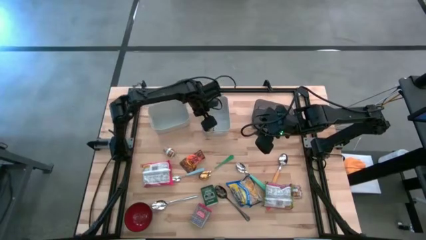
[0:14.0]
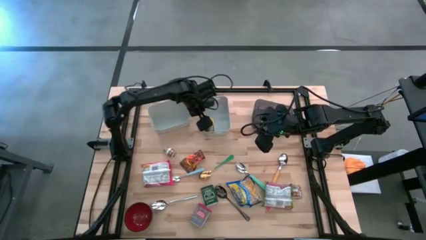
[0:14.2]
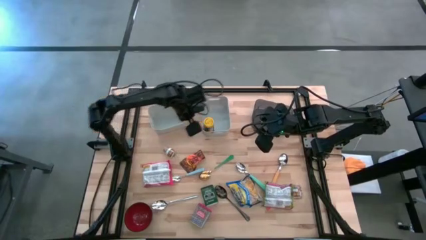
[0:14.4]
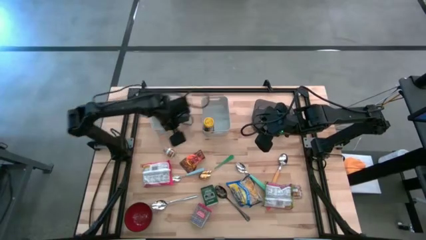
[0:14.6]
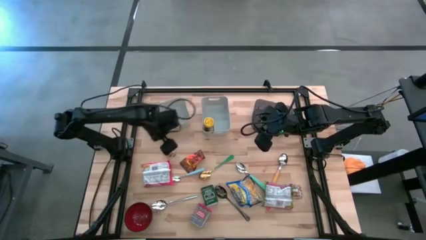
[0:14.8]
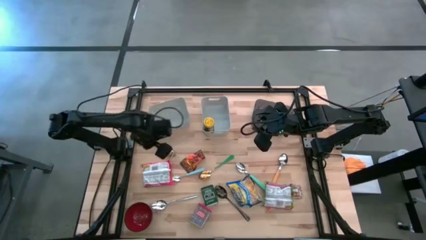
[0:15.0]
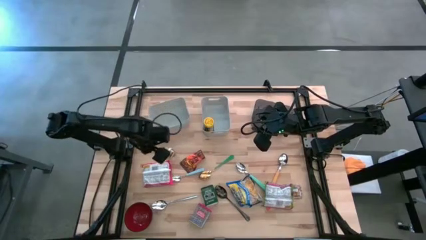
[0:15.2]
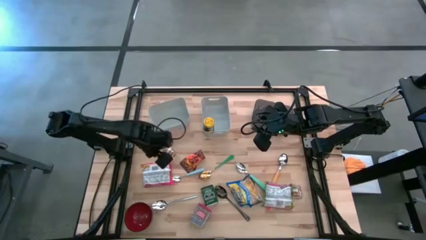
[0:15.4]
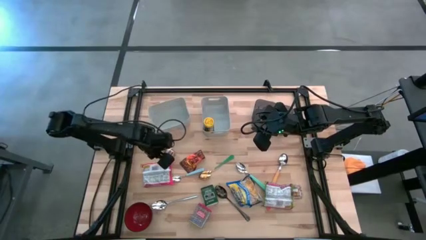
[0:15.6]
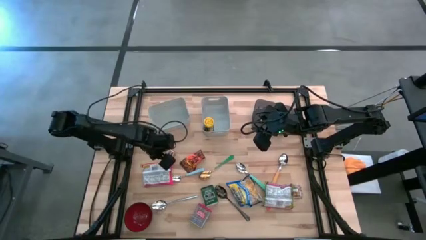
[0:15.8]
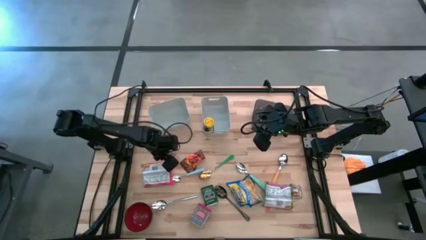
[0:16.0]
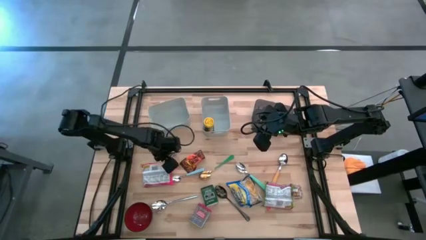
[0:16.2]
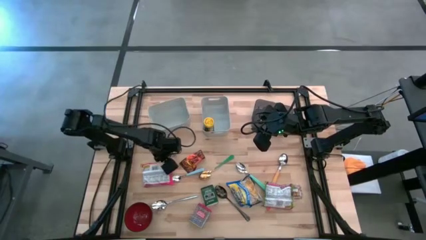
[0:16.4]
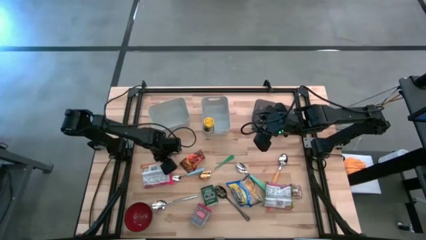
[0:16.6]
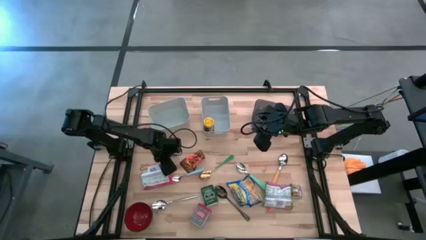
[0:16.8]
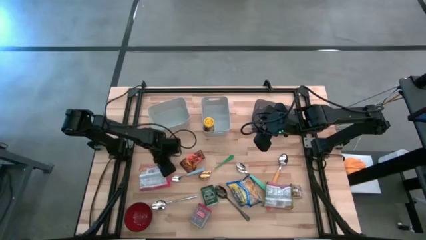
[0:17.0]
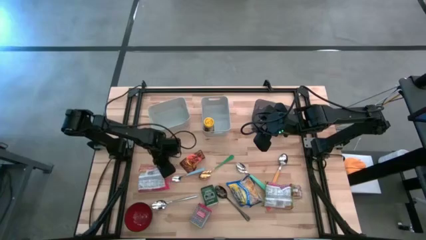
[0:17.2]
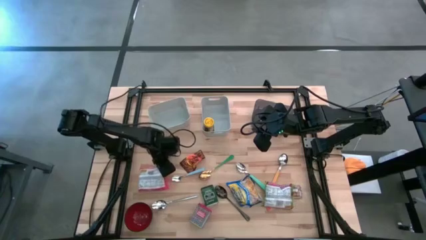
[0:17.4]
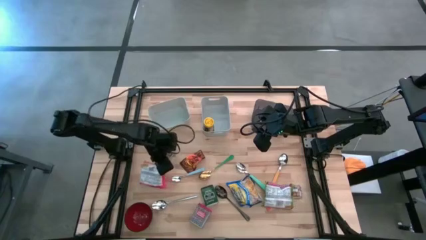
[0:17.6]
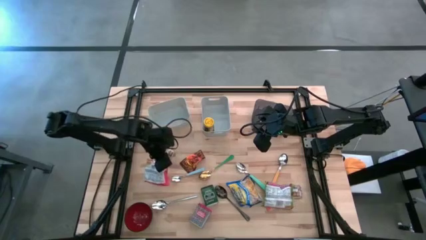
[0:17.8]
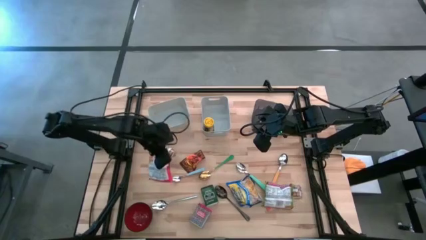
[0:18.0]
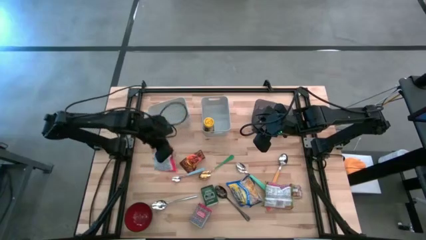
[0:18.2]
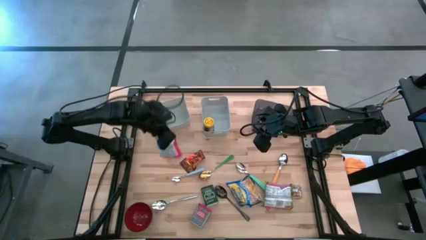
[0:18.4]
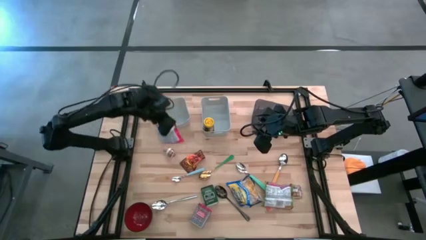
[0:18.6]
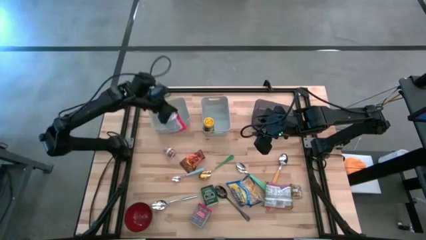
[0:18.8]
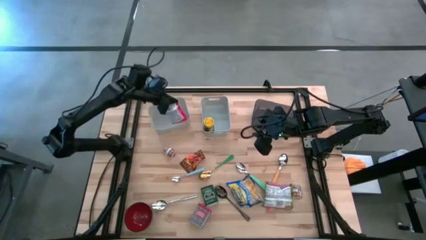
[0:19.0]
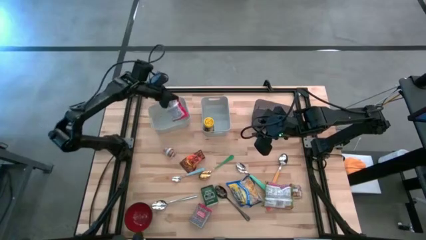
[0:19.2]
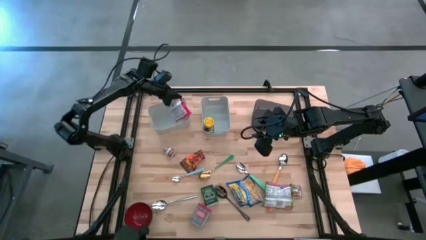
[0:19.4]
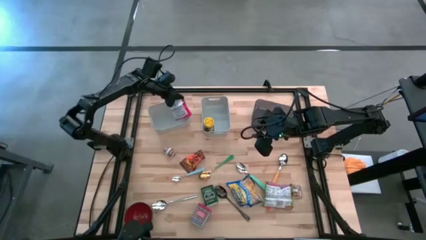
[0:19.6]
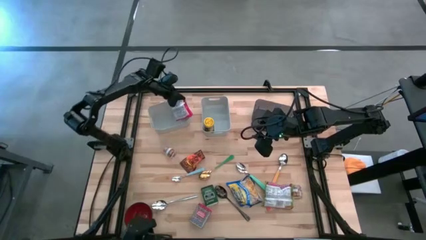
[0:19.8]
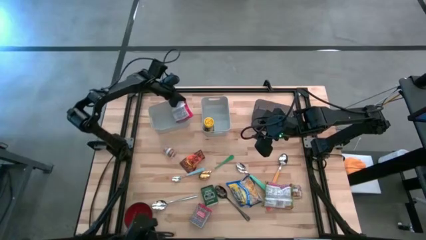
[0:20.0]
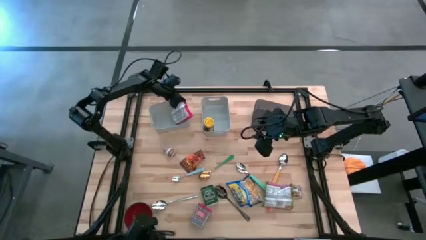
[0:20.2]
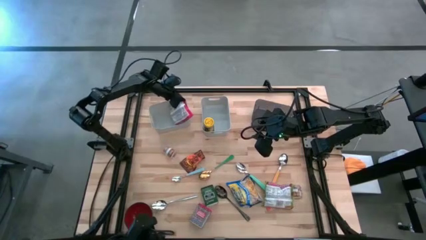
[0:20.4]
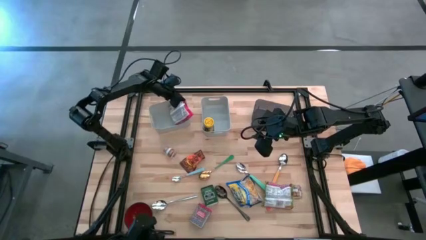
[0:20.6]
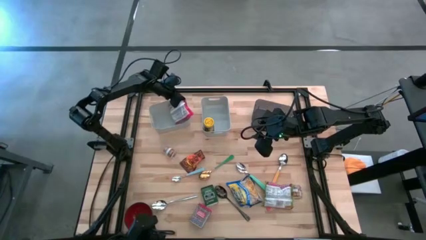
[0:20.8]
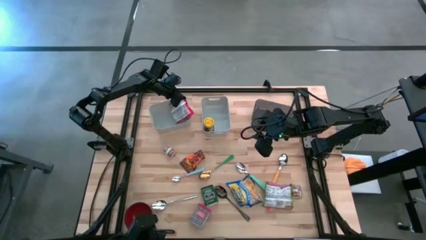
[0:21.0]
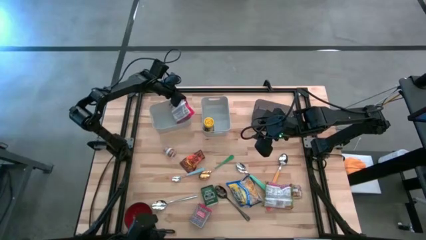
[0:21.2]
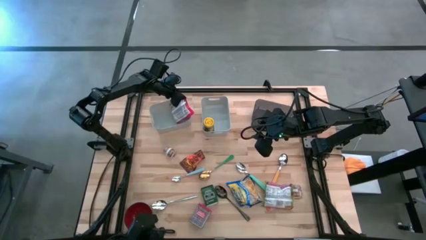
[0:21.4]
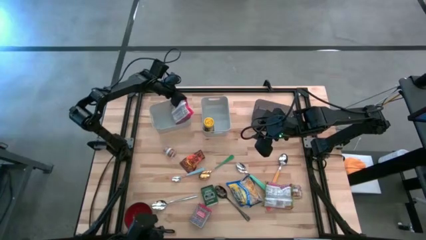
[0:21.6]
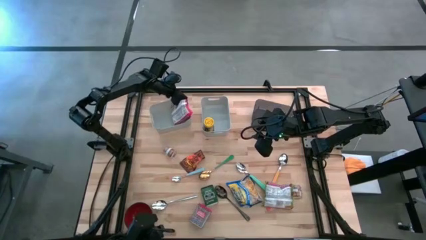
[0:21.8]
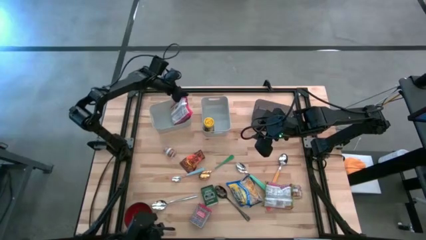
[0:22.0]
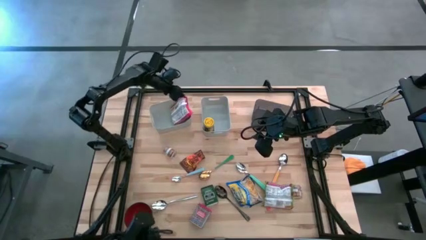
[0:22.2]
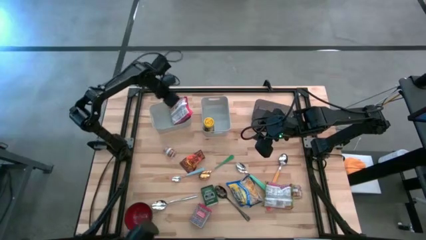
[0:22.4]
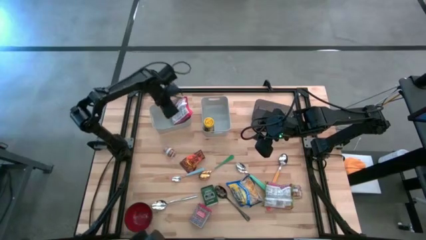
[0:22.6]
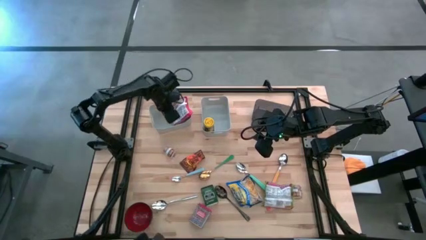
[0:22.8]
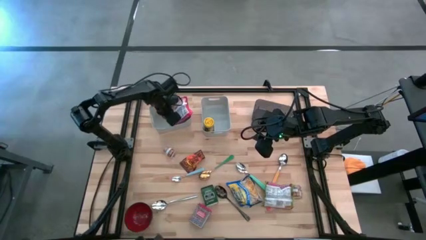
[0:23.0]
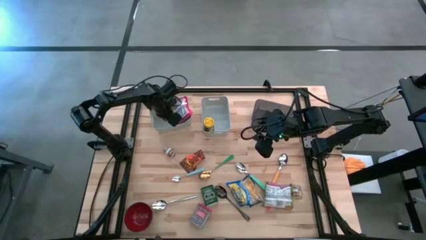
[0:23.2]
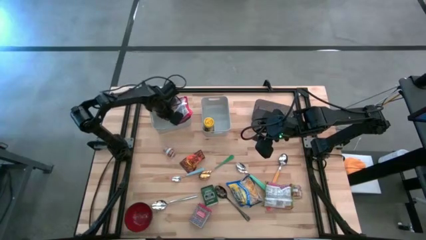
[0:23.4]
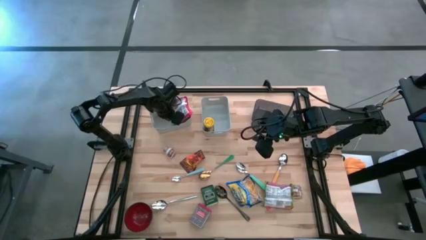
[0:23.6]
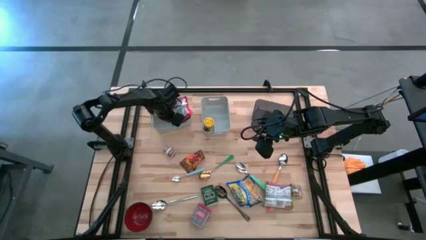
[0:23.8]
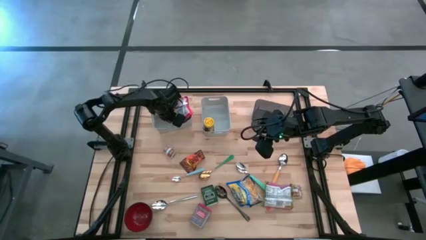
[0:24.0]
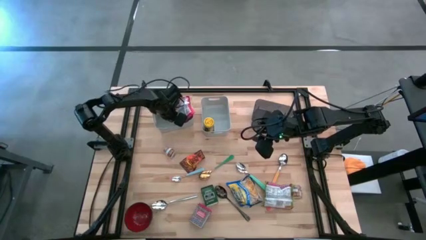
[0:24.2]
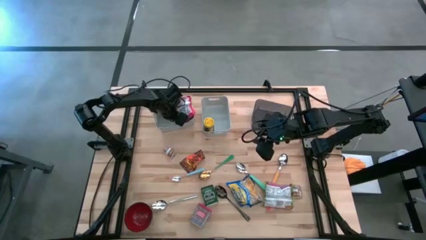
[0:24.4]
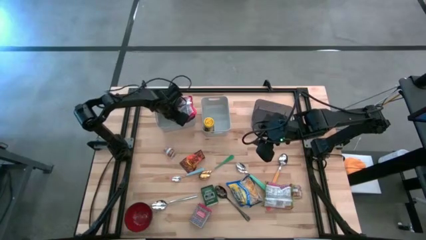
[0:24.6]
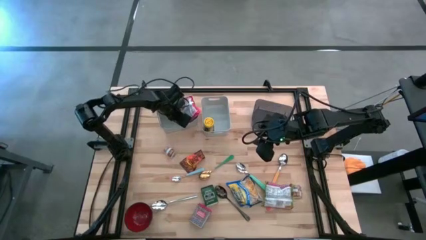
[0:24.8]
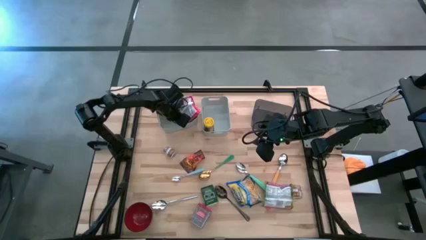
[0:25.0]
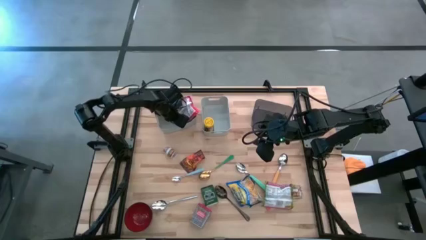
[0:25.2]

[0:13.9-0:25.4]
Put the red noodle pack into the left gray bin

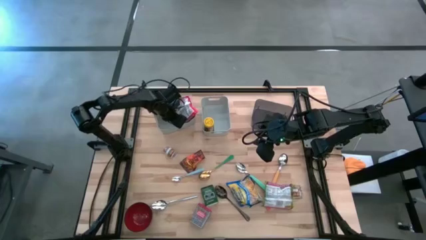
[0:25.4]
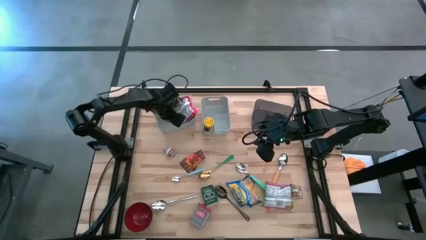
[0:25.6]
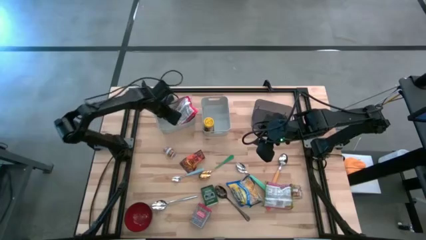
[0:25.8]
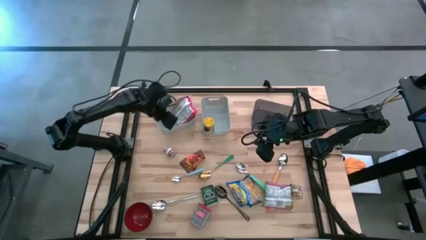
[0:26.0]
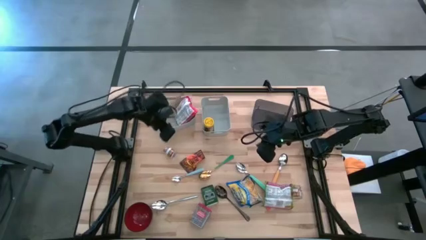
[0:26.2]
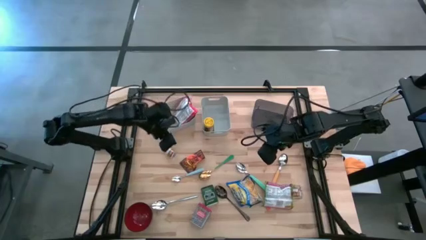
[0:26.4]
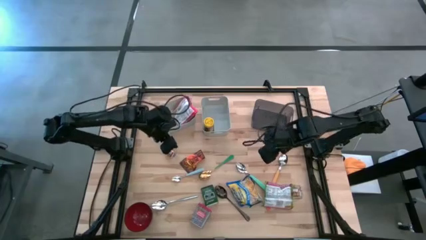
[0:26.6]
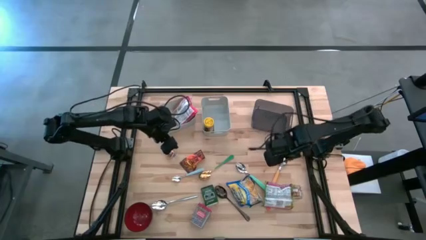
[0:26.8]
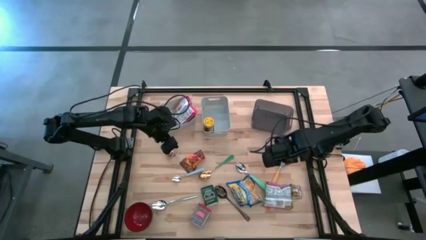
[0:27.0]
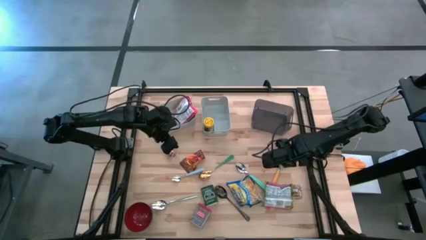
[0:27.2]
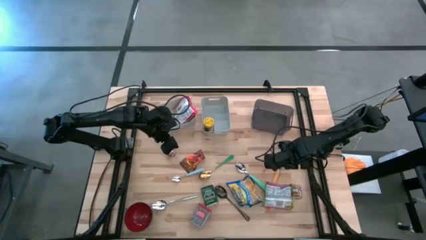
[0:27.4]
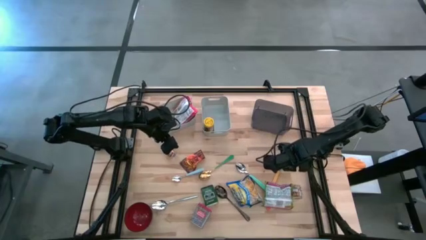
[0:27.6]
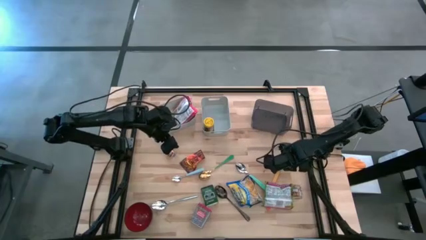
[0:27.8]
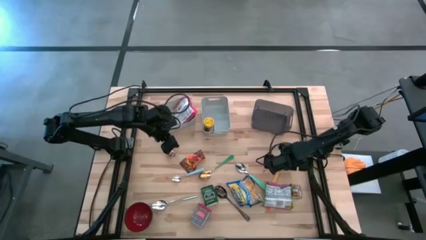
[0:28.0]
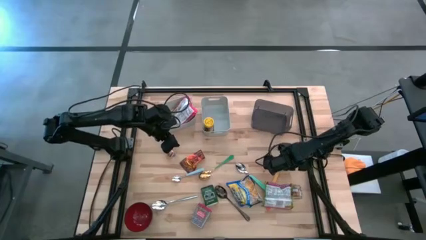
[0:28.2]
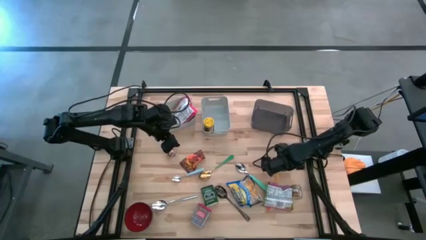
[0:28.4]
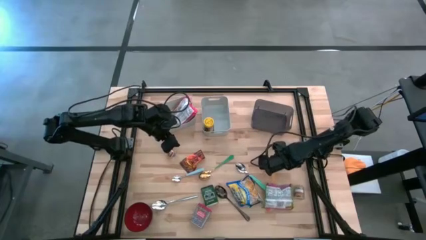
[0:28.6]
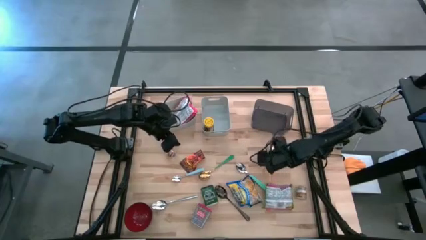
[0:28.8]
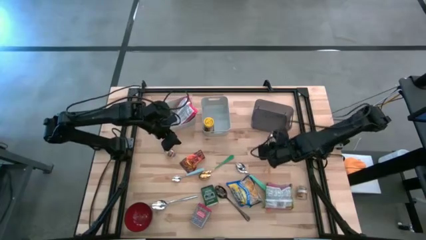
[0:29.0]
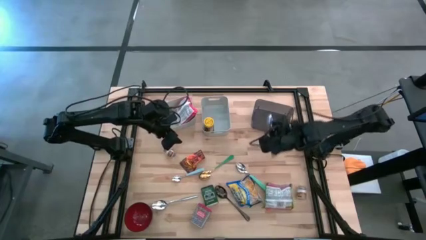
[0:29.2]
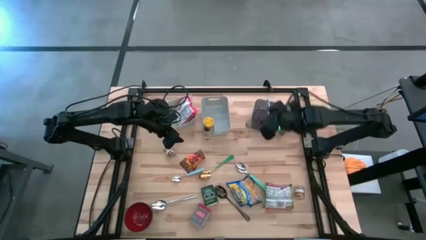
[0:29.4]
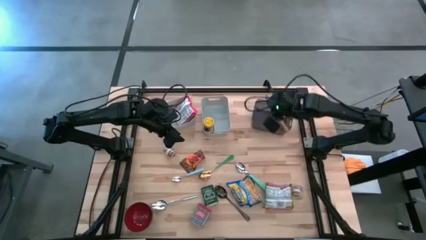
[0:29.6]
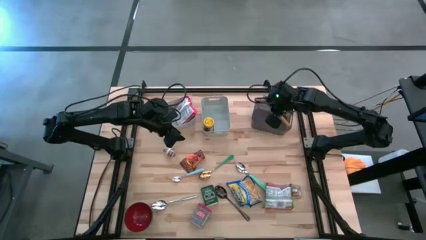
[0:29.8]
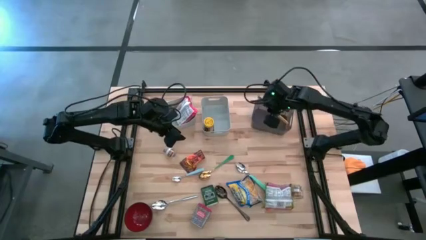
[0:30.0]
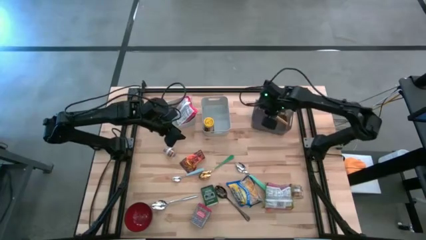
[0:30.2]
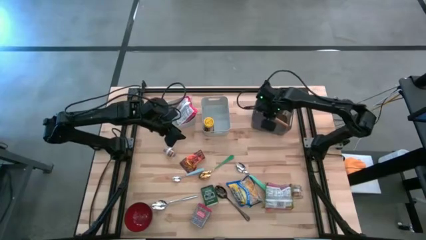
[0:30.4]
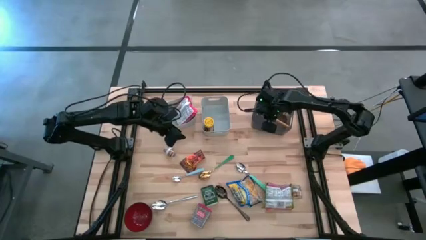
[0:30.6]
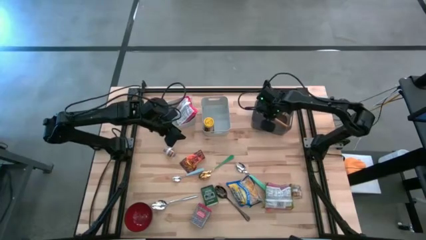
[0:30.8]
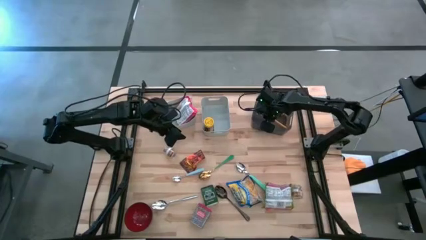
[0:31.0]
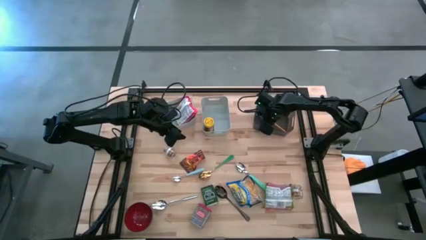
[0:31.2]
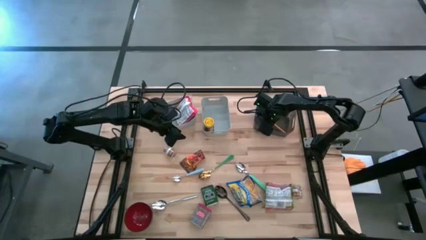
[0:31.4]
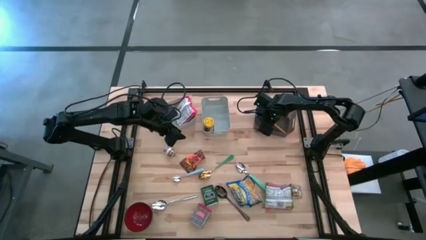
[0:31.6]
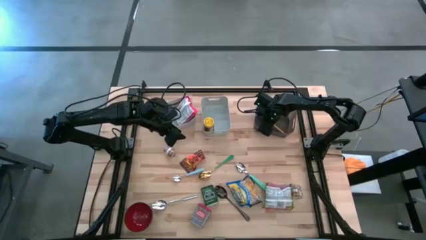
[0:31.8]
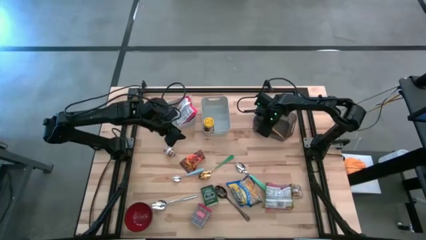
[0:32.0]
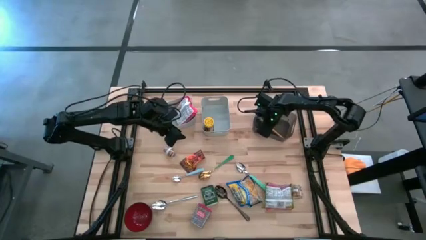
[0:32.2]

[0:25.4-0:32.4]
Put the brown spoon into the black bin
